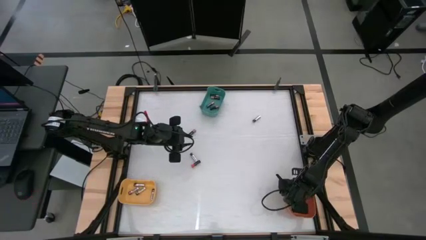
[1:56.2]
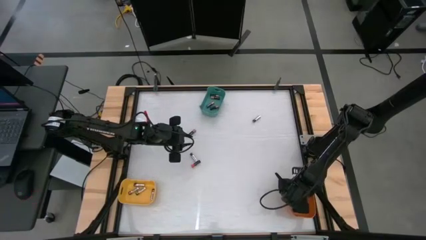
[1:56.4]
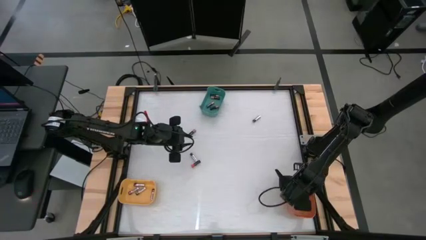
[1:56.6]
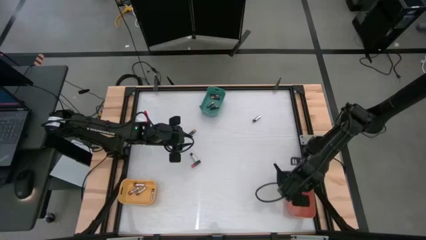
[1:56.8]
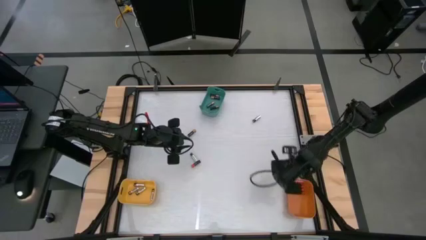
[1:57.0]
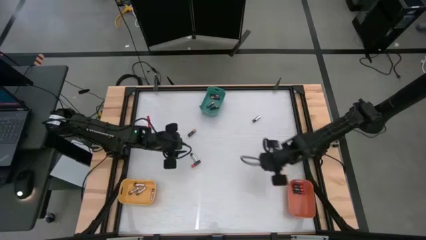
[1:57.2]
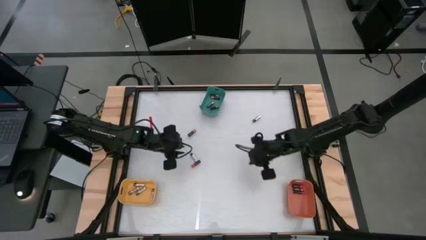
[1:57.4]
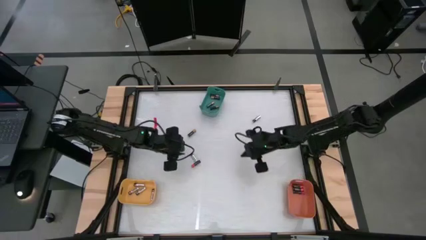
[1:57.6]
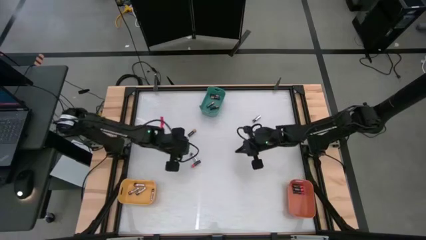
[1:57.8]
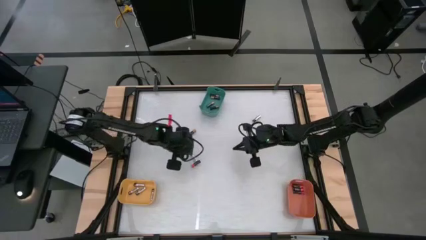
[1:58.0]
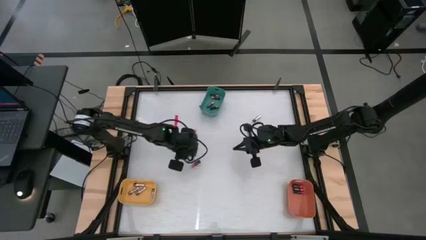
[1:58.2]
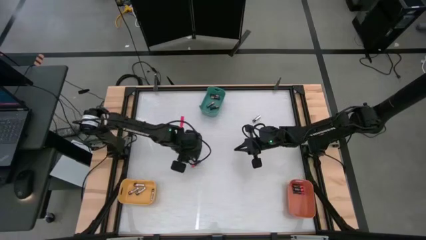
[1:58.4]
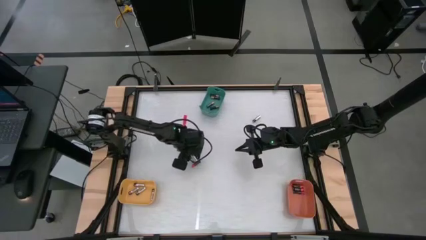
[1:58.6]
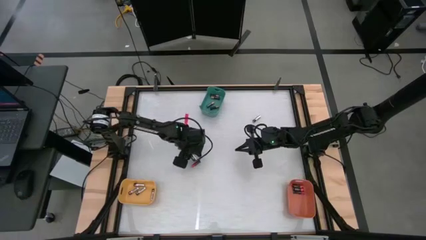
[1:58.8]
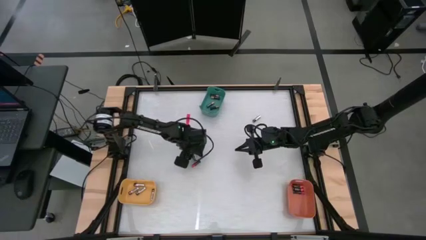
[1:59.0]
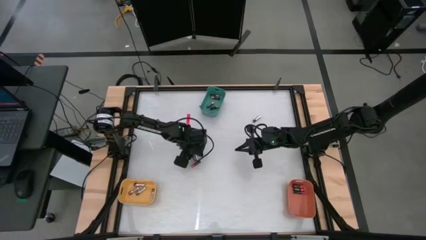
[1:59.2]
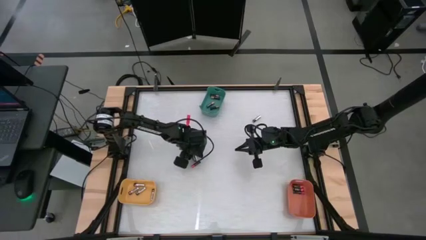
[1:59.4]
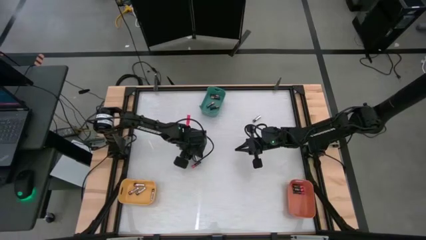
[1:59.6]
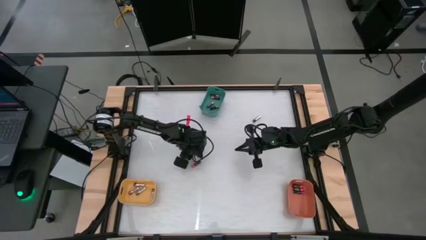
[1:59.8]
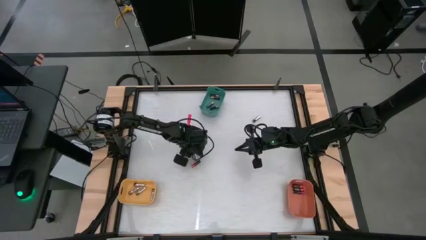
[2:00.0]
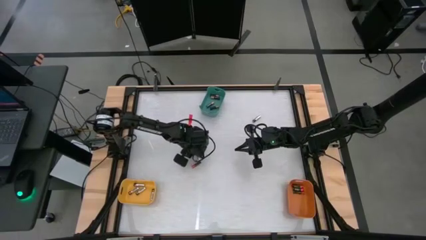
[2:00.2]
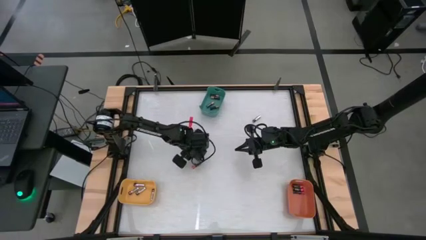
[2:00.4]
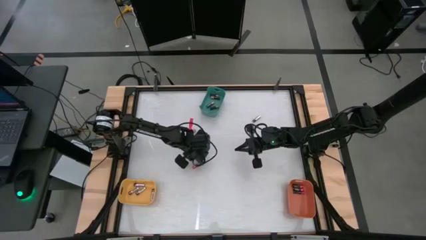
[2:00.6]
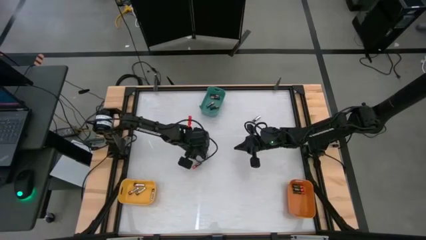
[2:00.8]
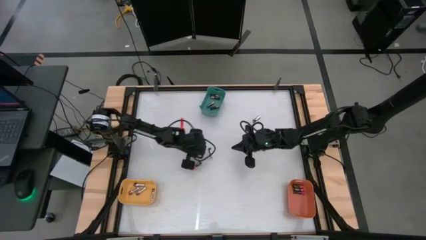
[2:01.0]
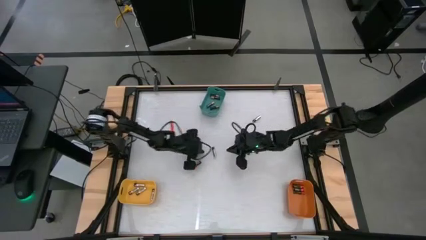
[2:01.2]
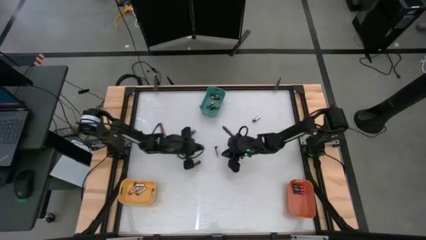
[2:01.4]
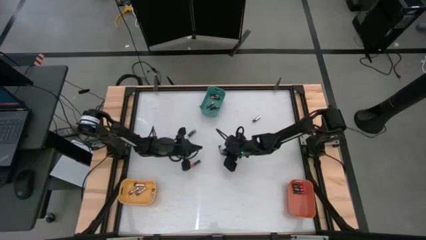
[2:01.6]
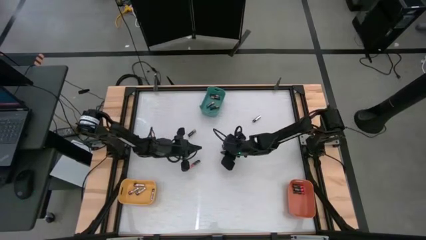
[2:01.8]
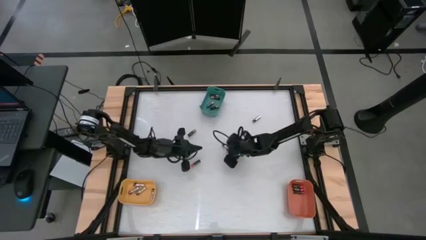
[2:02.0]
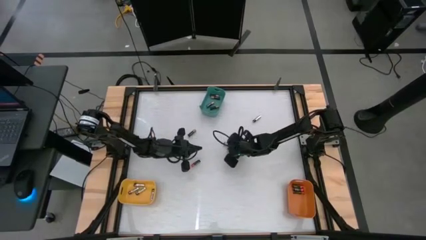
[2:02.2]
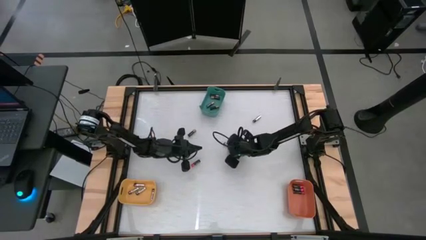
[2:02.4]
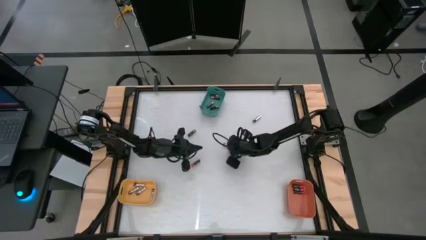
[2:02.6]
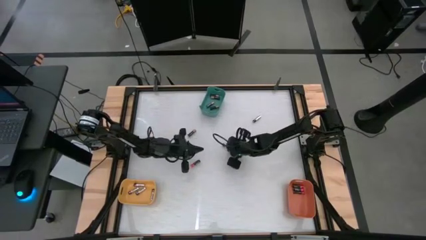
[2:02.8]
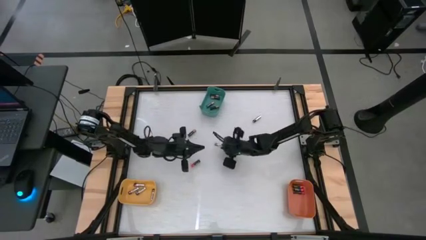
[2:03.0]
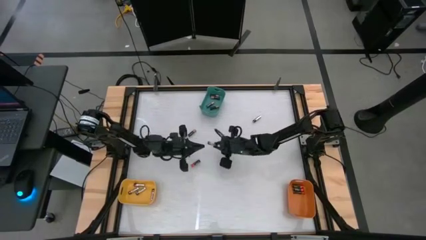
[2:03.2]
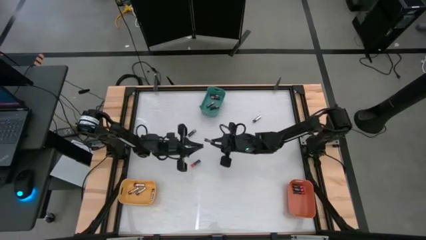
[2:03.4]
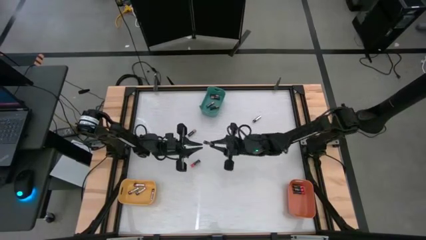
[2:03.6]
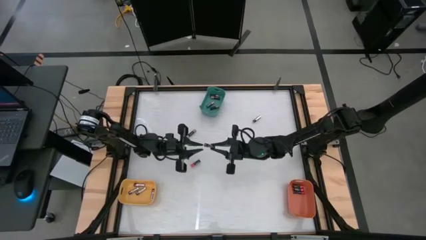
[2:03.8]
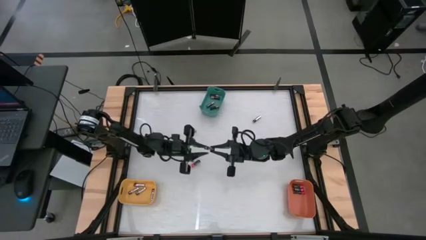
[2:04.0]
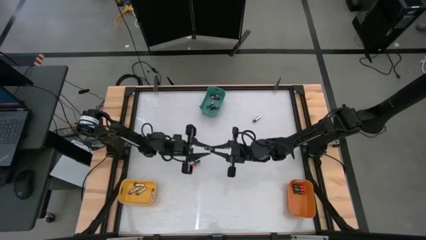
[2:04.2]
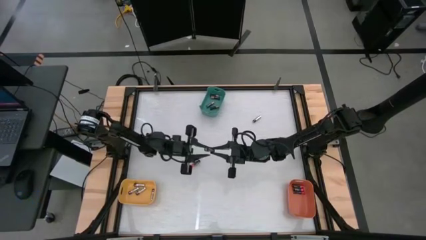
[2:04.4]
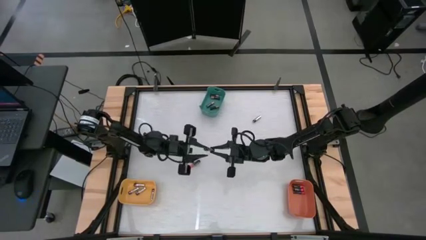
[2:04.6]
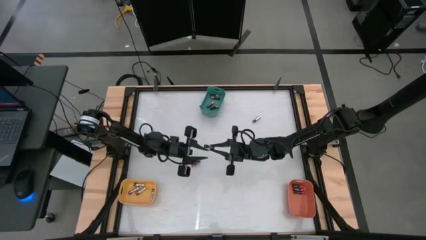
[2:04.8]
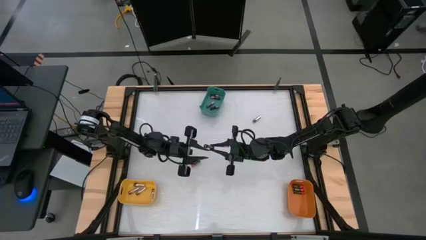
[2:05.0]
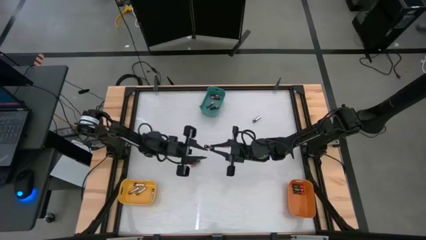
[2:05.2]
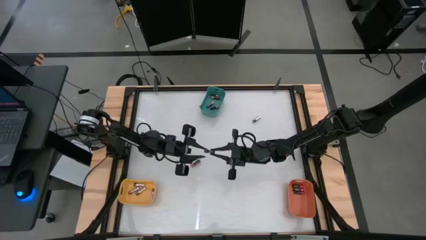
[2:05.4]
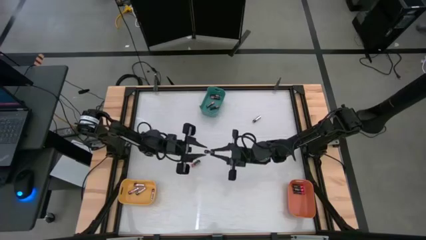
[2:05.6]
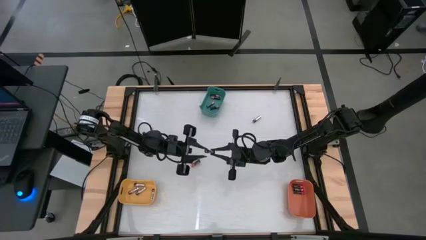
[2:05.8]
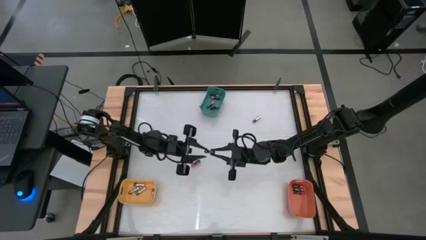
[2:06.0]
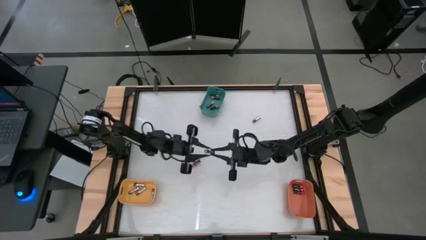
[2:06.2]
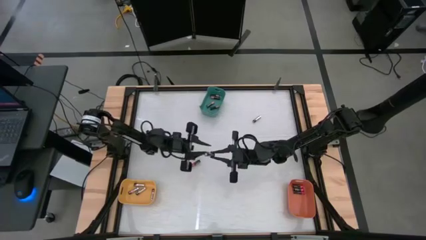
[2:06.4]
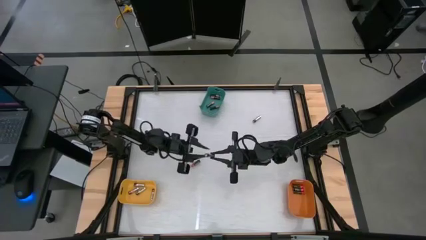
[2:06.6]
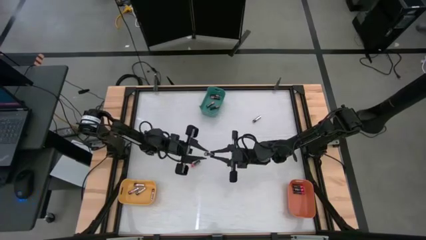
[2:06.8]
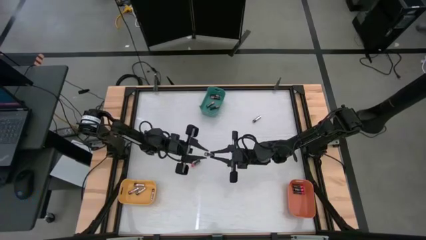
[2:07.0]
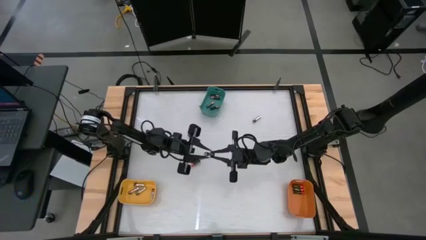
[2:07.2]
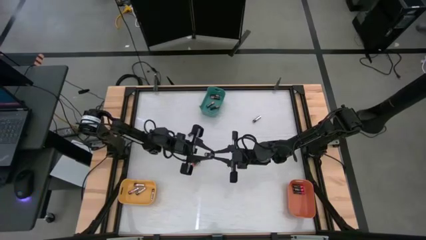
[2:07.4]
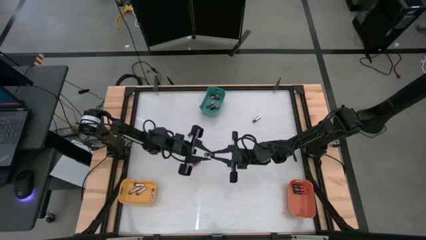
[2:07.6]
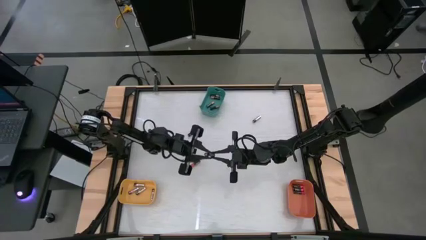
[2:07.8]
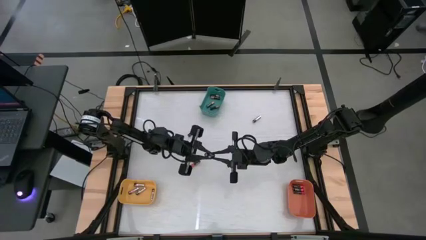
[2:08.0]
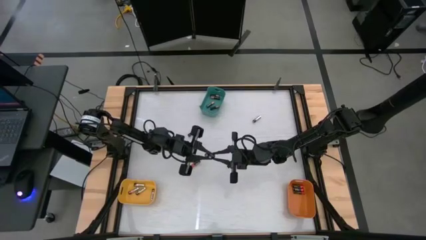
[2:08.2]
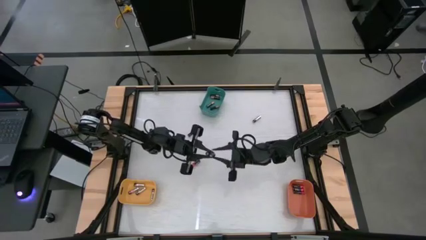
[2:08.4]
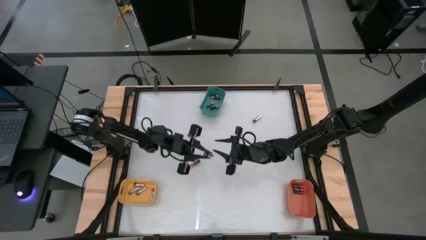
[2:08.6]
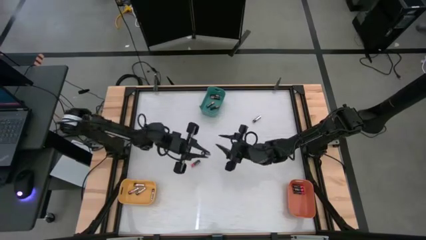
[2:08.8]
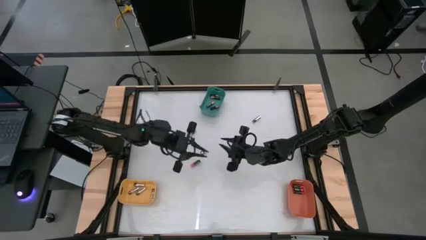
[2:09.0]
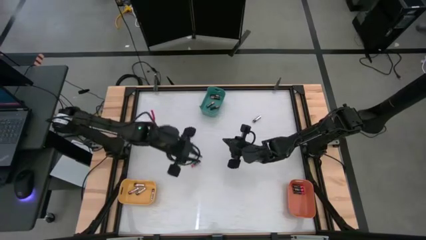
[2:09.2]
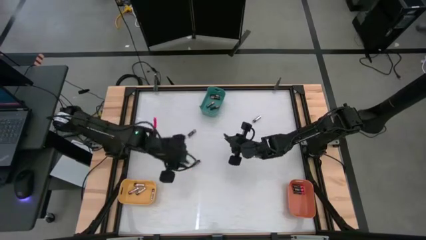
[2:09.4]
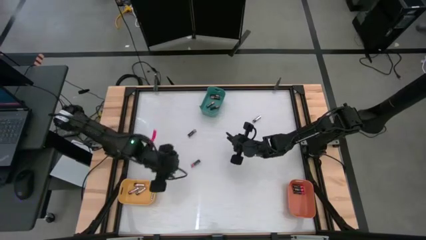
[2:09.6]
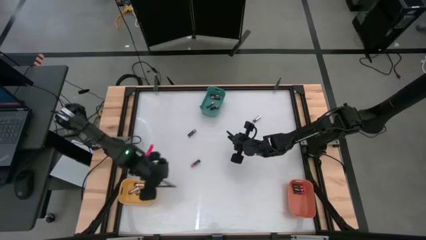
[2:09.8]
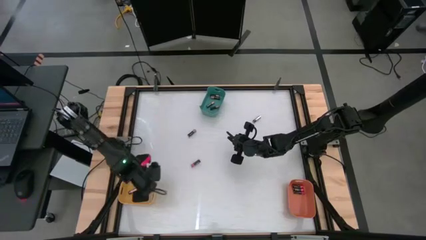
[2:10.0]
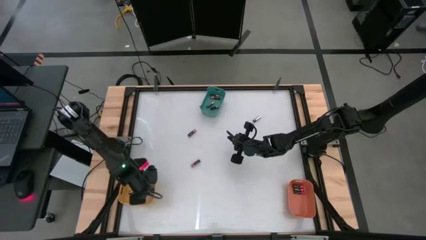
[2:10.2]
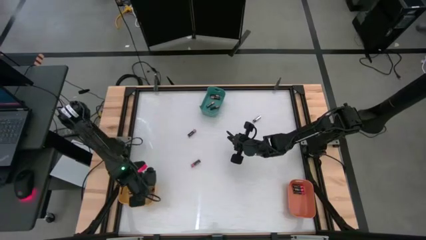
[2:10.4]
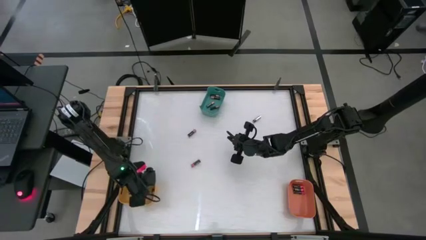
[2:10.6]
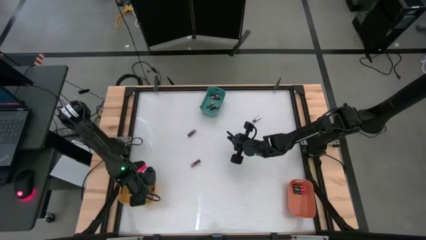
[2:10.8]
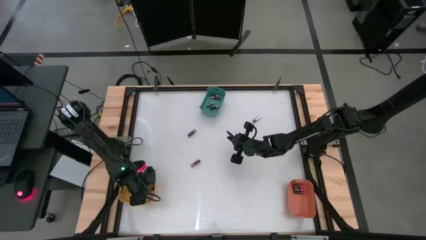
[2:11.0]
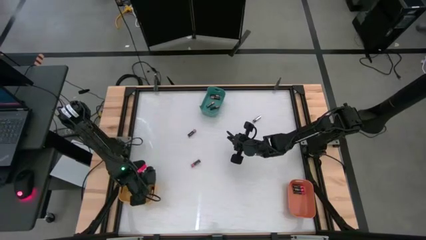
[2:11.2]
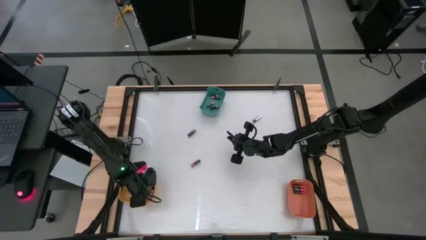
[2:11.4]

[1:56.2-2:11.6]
Task: Sort batteries
Put the silver battery into the yellow bin
